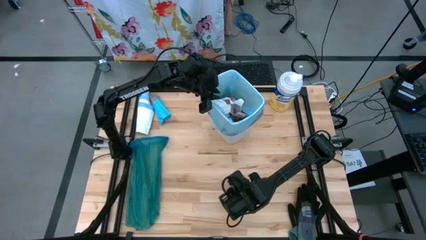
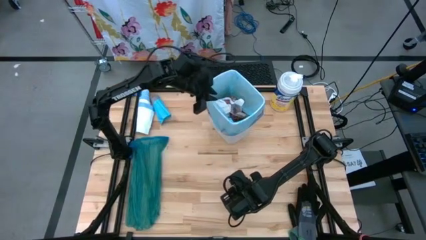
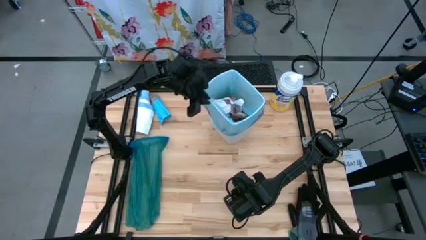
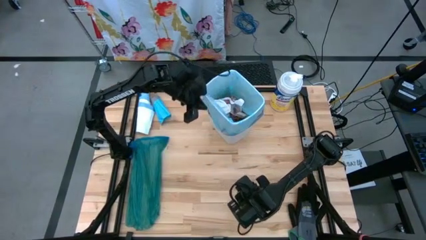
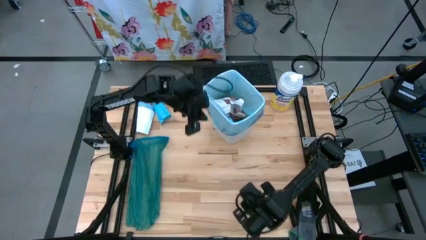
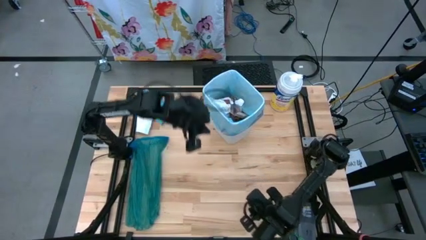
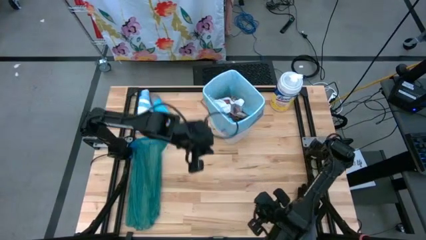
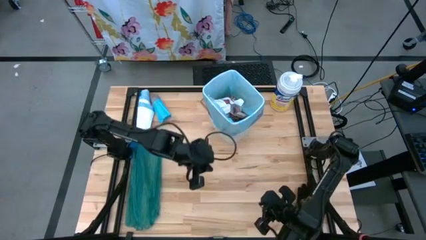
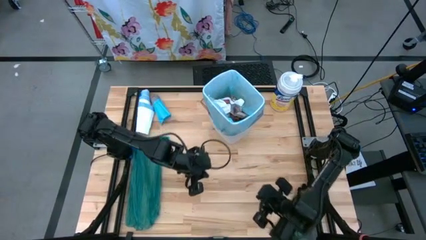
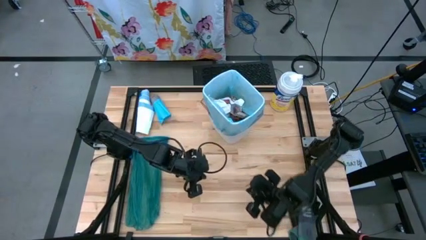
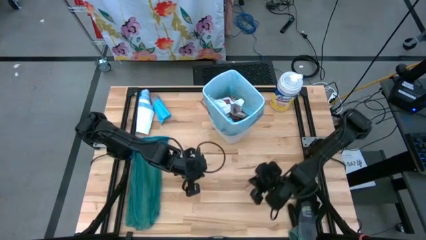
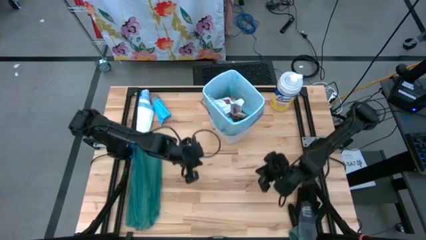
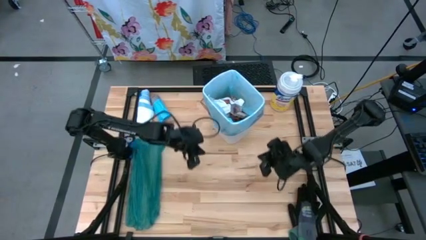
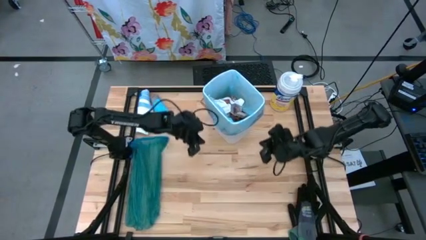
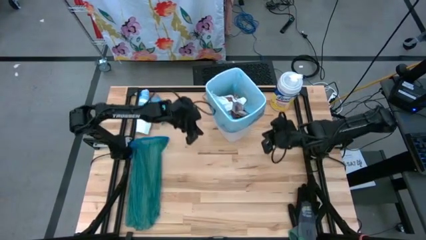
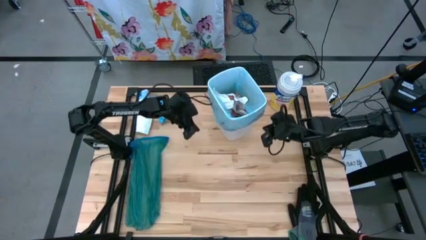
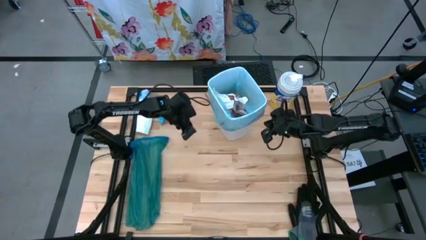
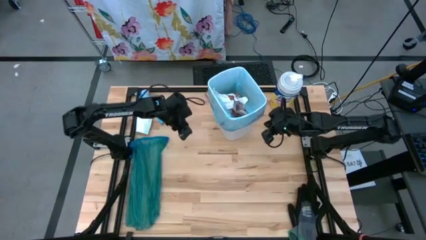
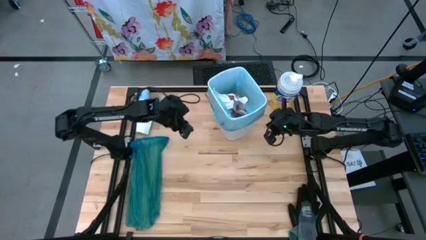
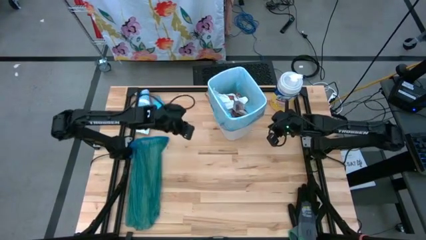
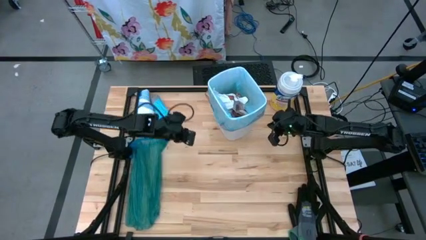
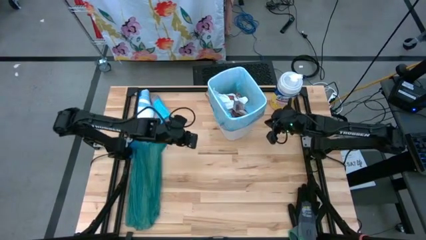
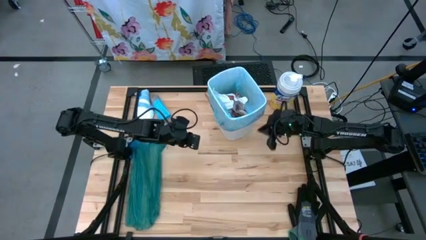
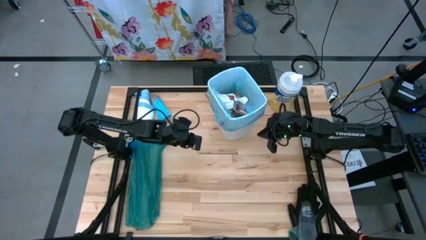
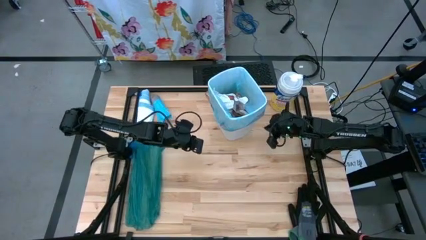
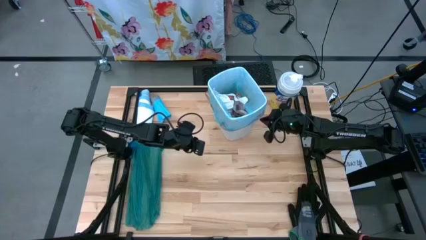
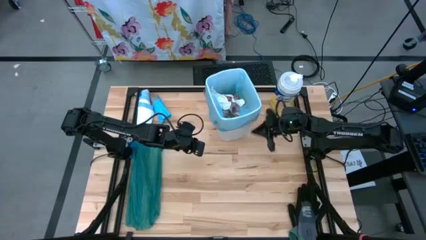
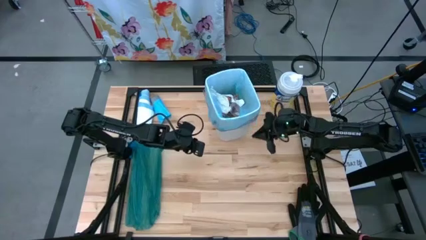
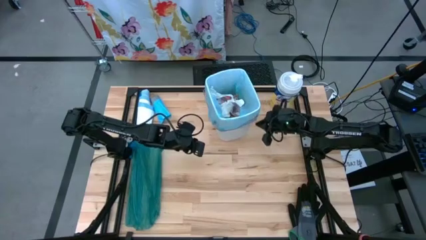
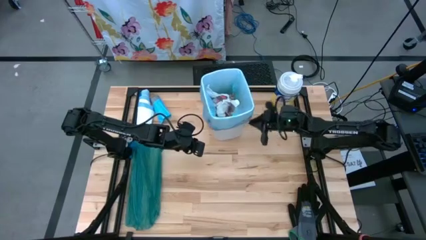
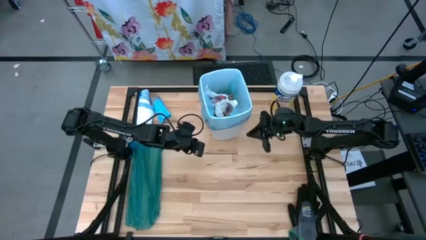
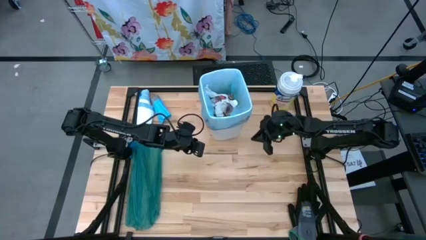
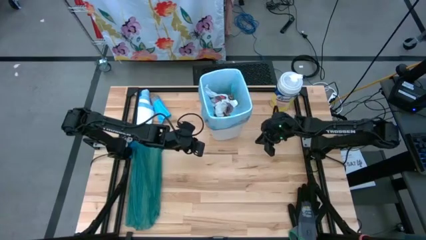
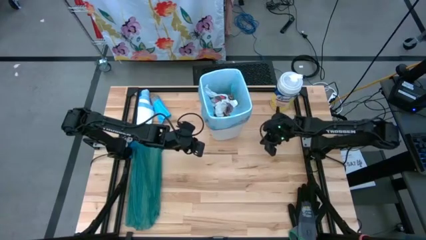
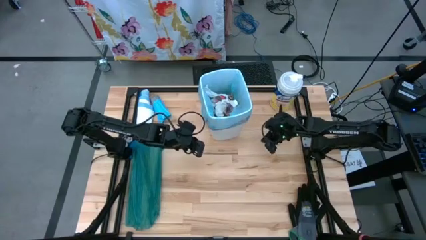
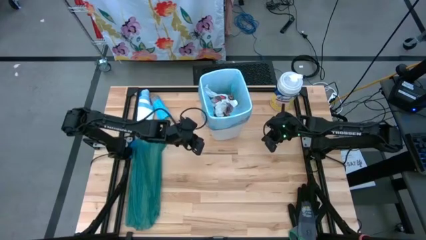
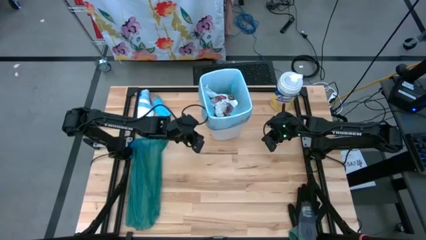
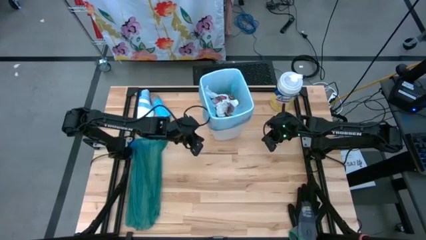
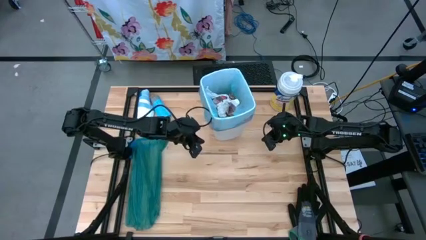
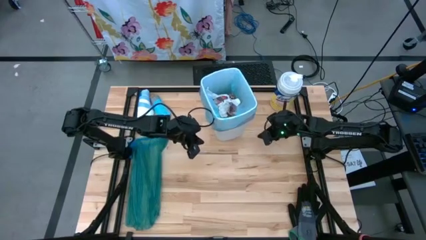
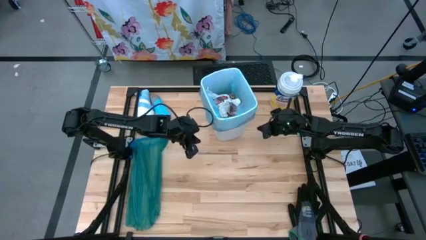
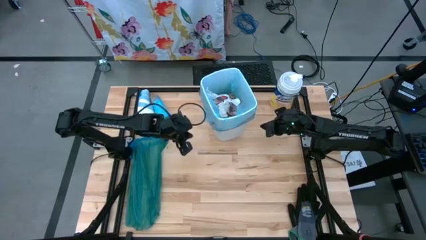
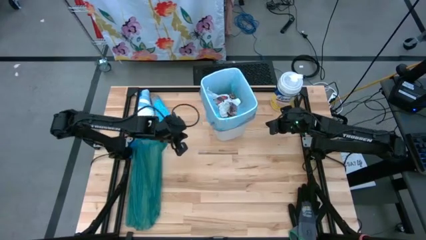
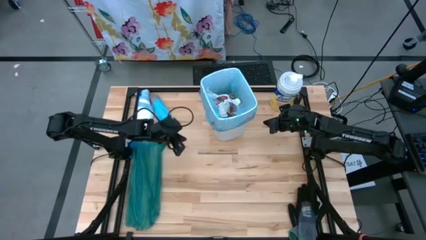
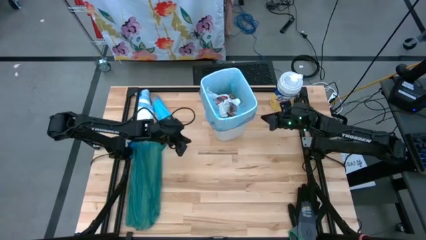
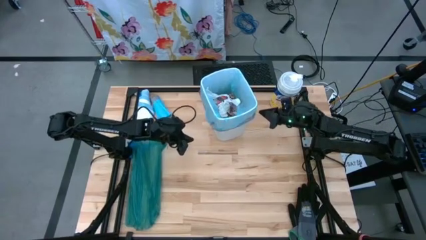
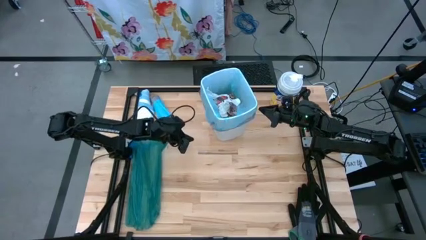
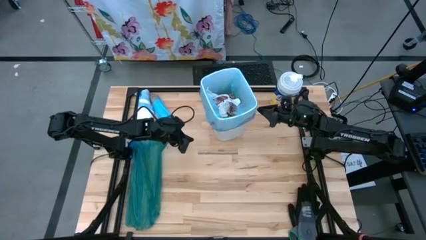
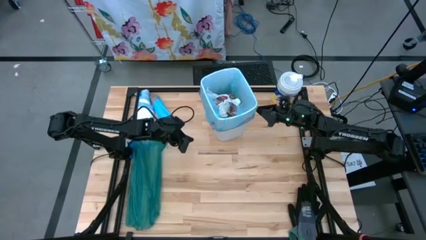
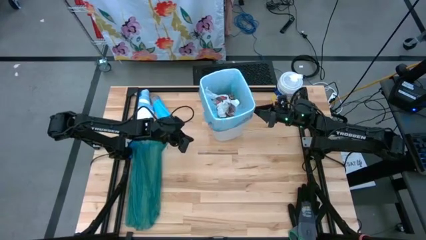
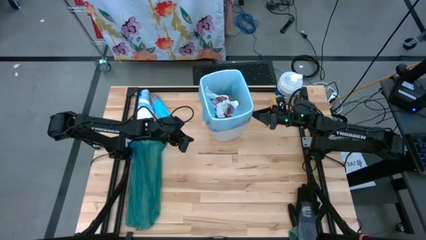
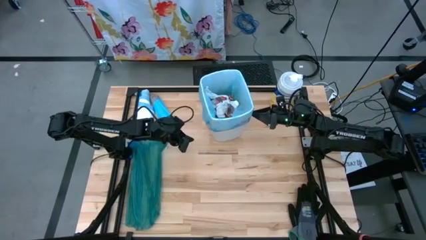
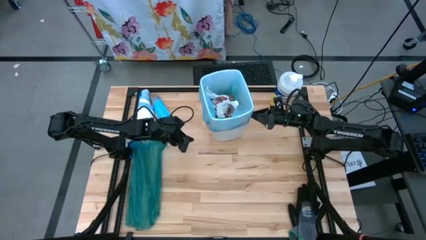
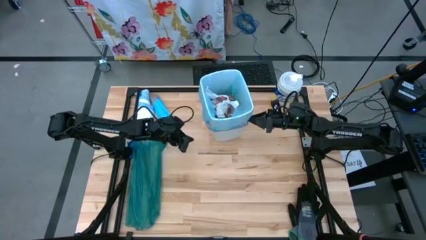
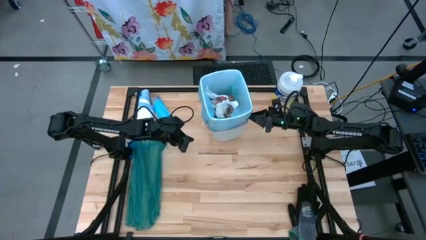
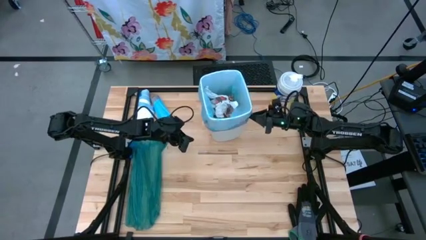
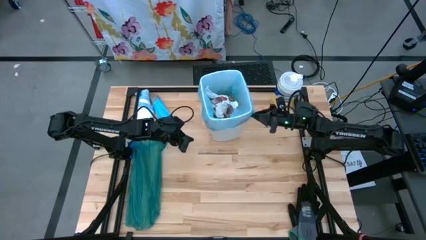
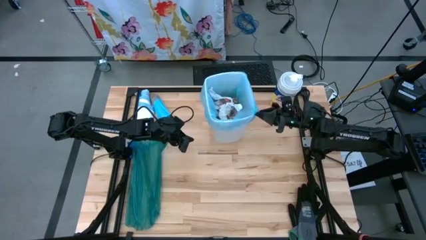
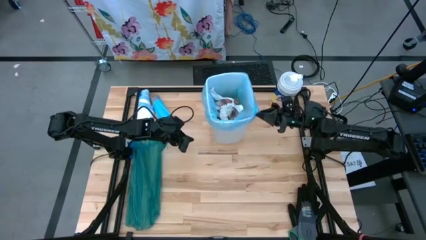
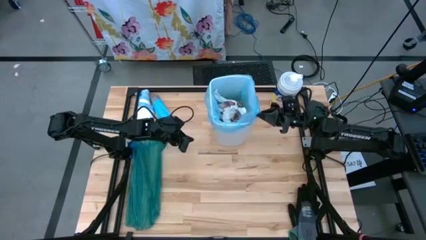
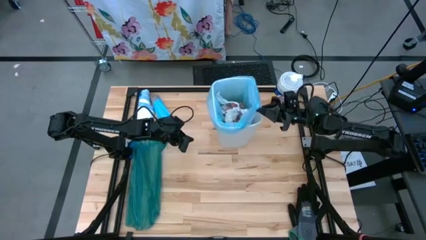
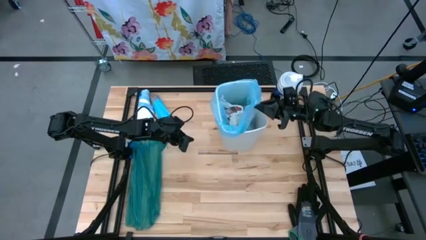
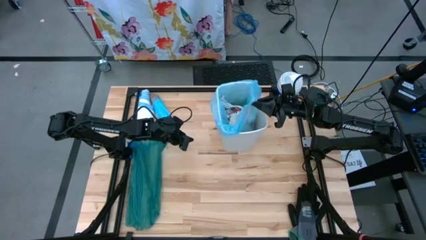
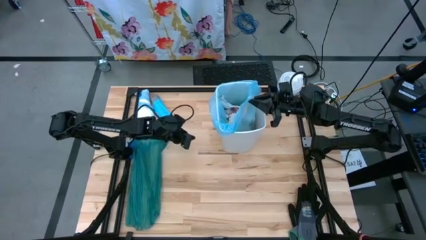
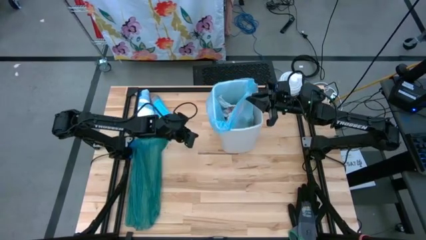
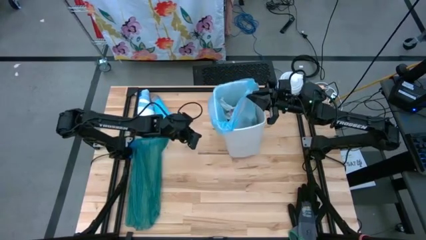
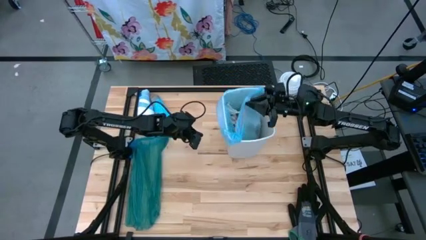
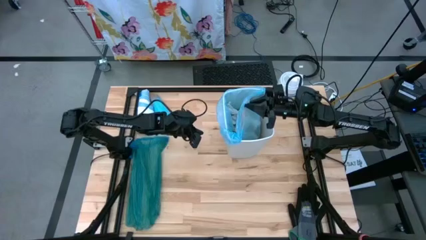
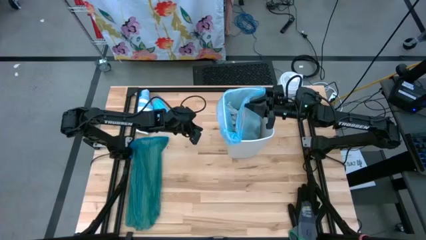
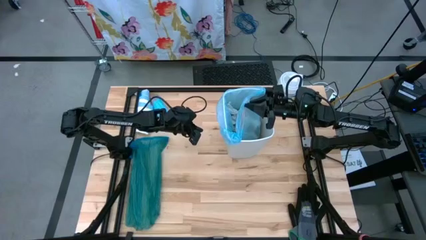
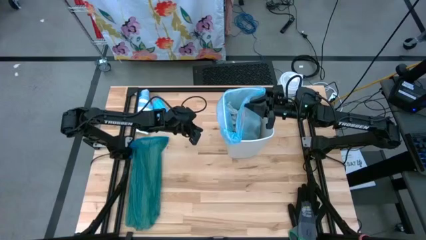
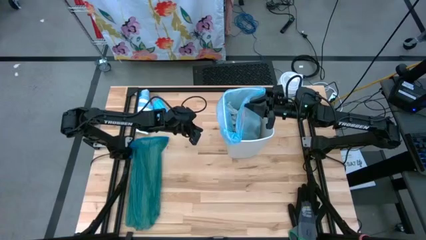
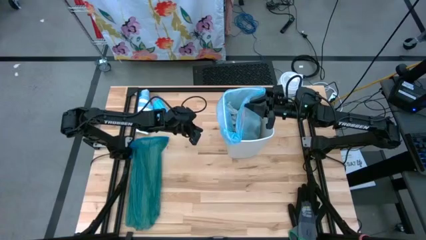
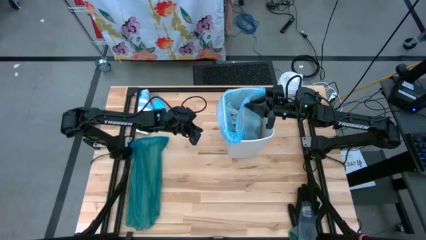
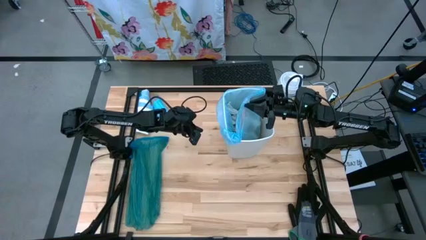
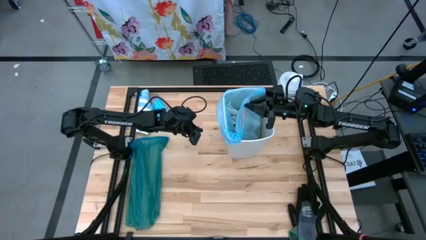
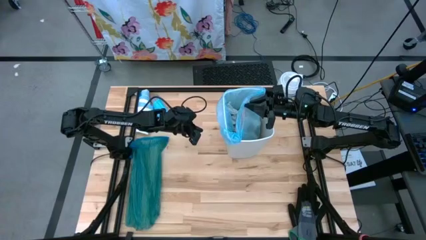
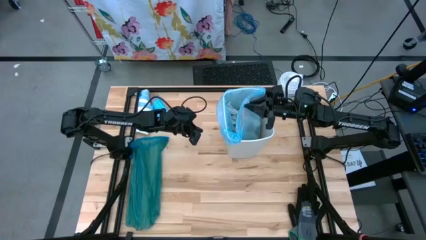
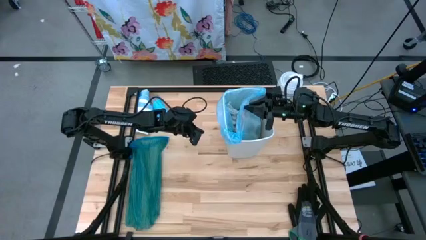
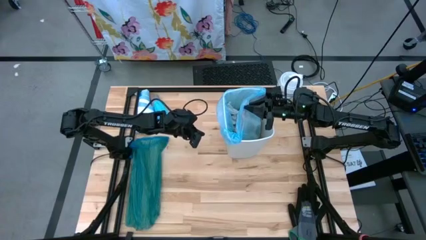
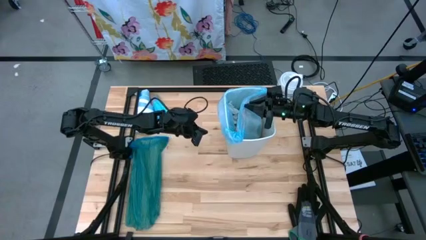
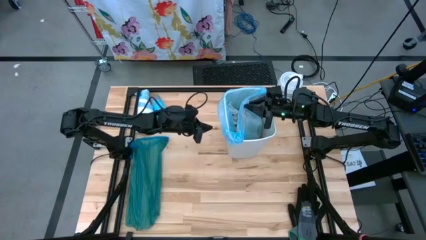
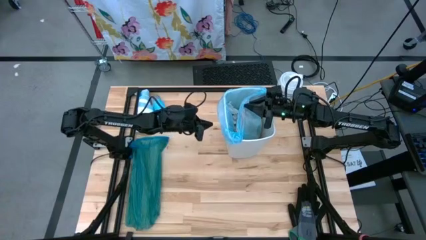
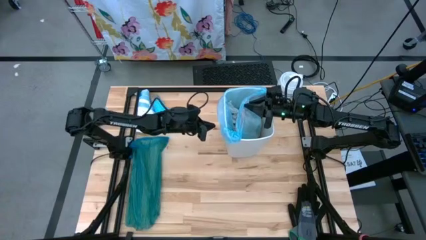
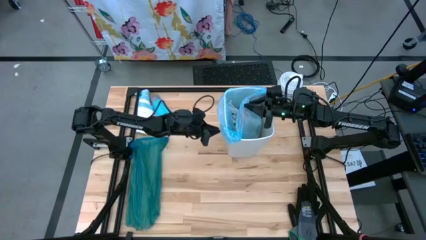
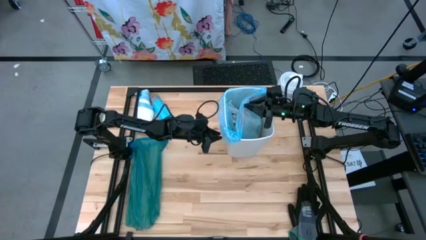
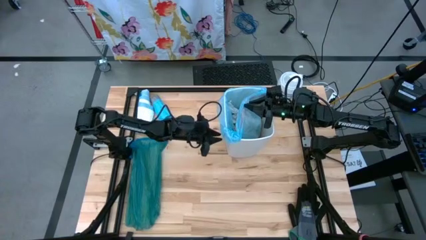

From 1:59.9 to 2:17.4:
Task: place trash/remove bag and relplace
Close the blue trash bag
